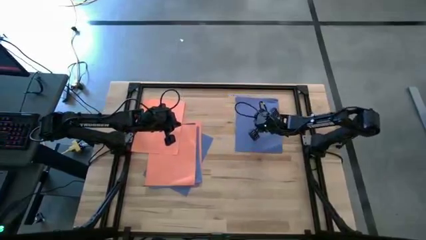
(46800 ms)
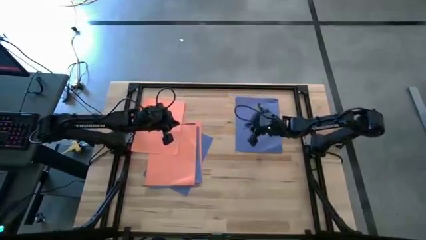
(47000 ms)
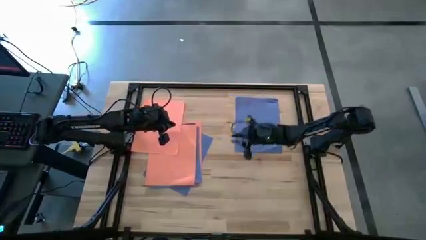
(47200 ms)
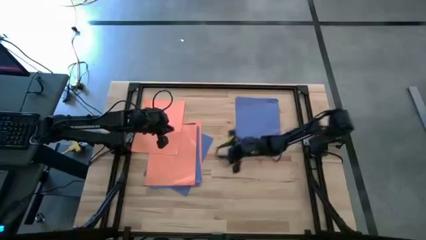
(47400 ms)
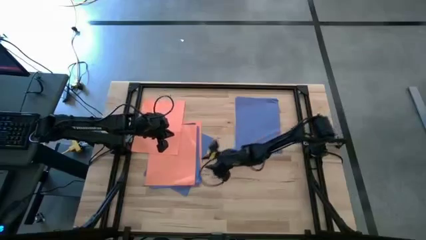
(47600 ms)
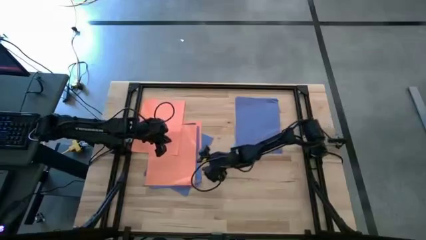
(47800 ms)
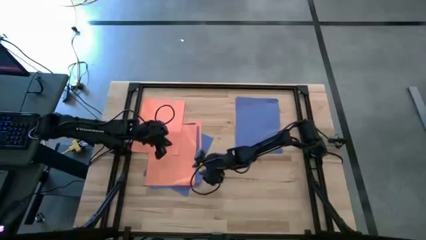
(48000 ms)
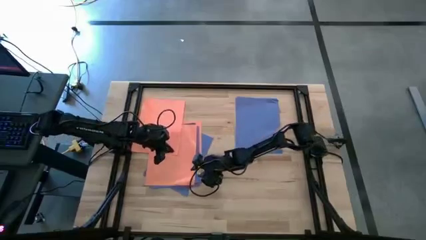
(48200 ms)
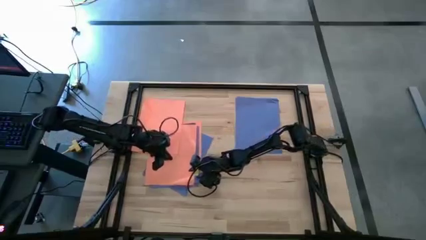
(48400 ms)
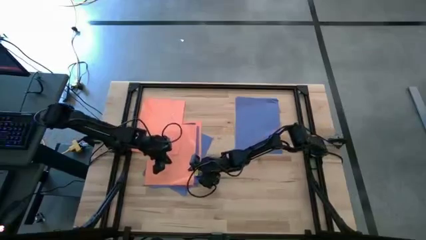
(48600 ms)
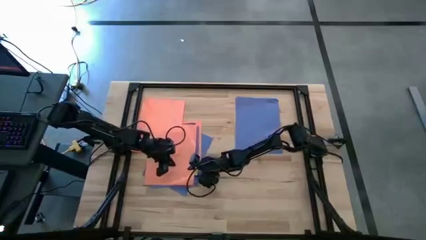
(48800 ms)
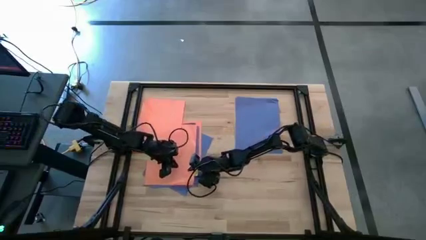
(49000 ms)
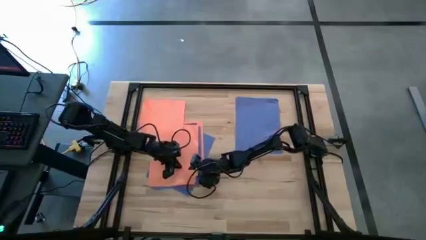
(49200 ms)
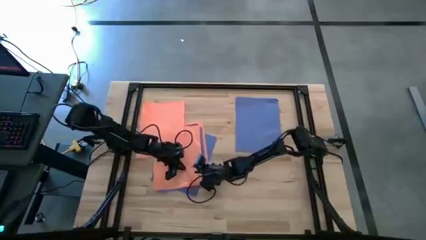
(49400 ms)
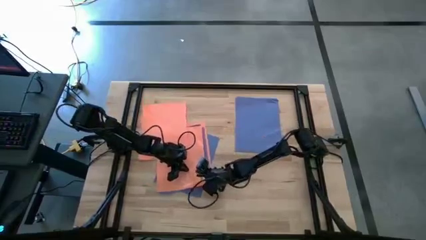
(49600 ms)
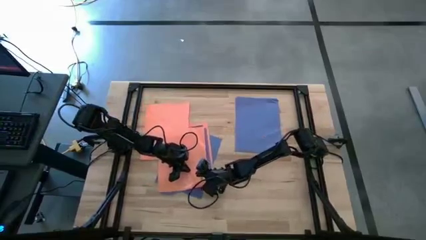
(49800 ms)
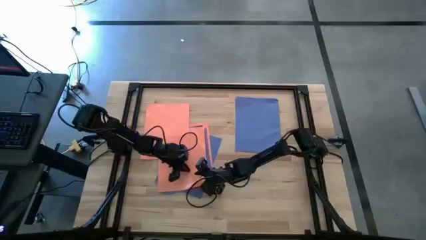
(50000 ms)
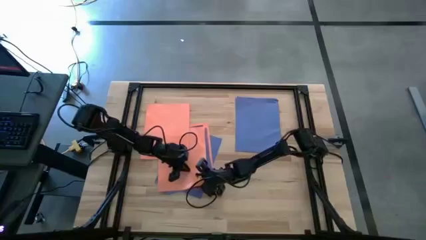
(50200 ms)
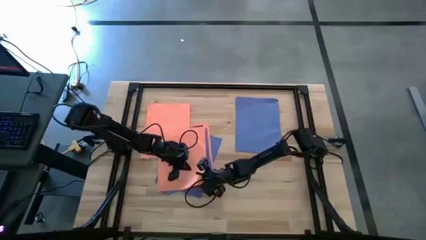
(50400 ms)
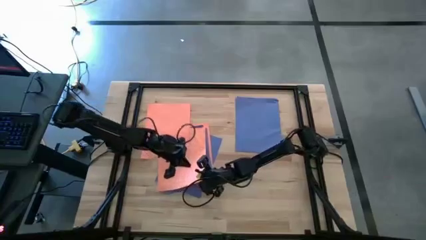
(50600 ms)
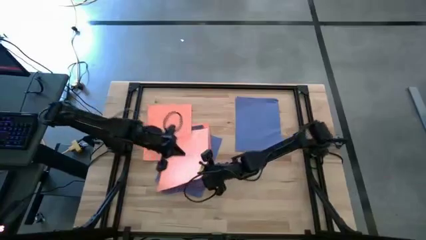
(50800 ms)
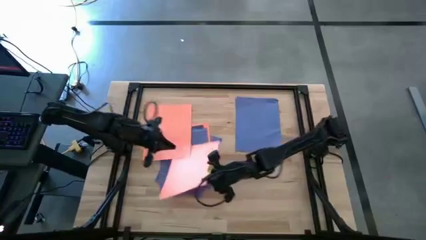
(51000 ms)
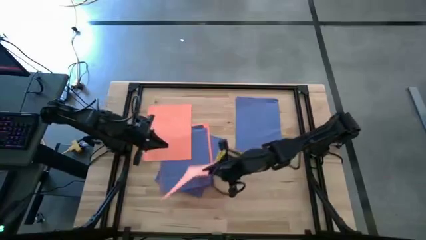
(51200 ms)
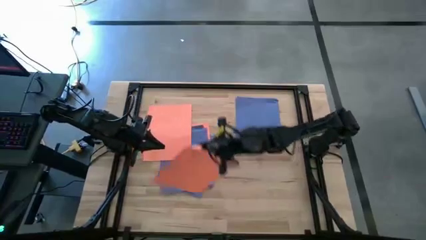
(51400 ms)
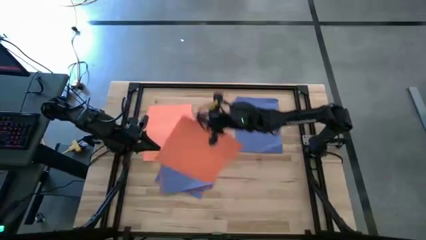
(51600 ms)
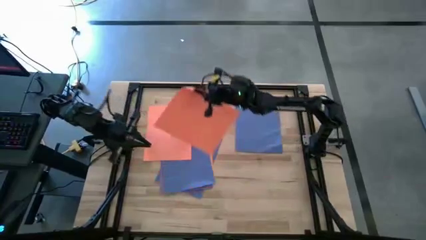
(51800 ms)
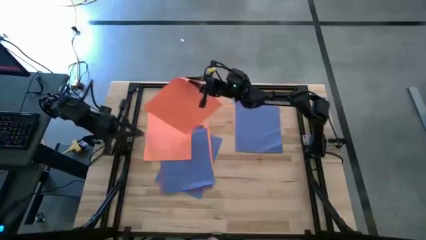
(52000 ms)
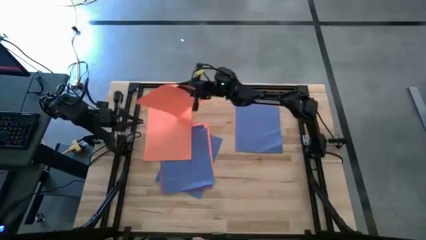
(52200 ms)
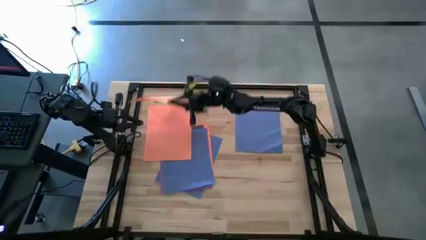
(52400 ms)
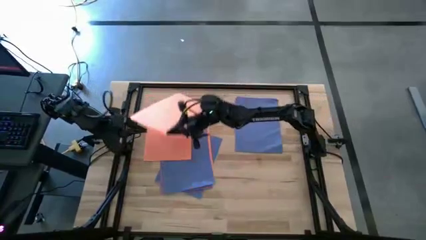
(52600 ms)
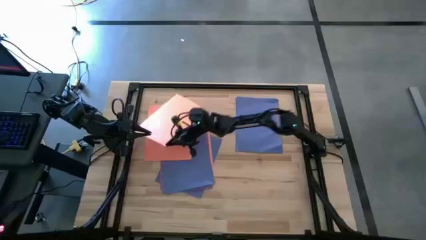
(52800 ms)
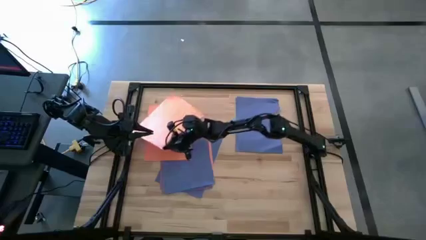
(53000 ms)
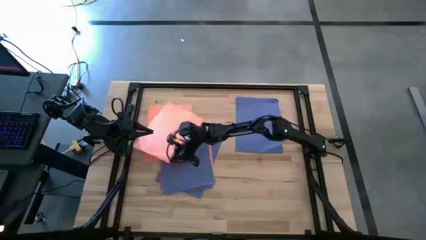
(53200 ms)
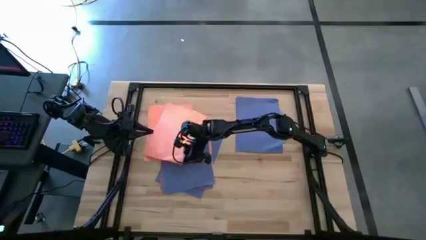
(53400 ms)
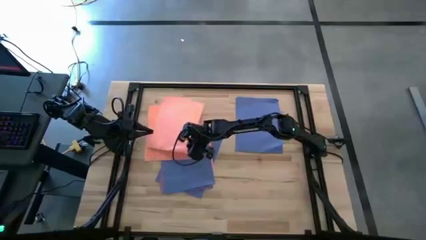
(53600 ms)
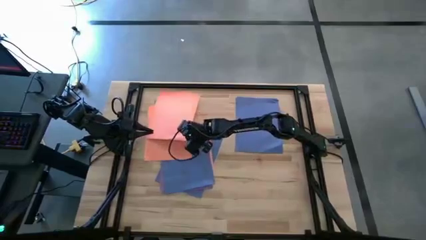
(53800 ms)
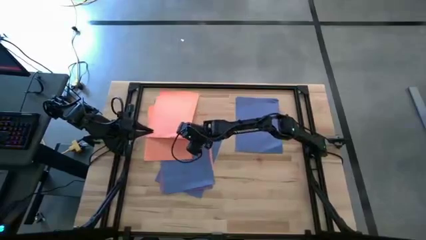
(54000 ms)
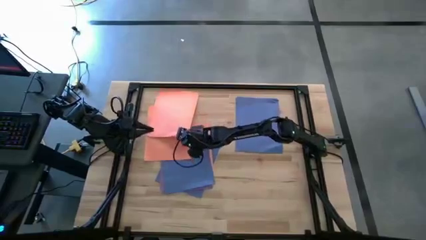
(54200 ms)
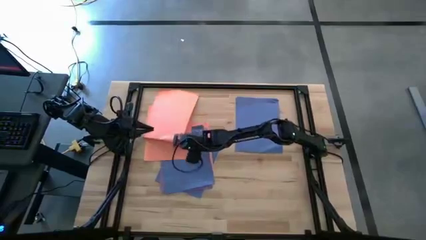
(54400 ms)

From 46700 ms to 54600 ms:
Task: Organize paper
Stack the orange paper on top of the orange paper

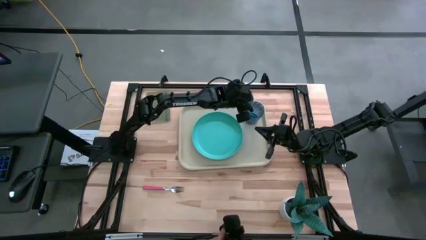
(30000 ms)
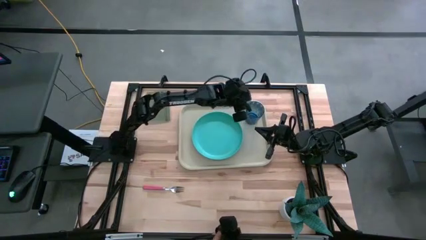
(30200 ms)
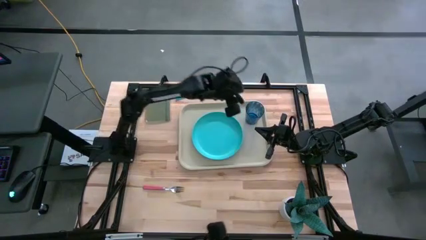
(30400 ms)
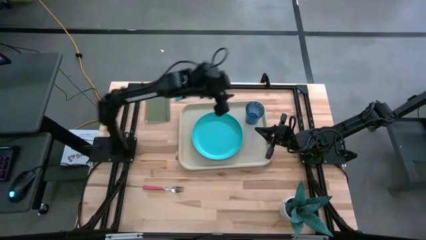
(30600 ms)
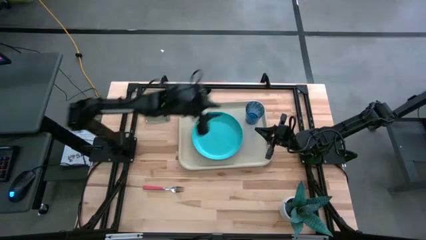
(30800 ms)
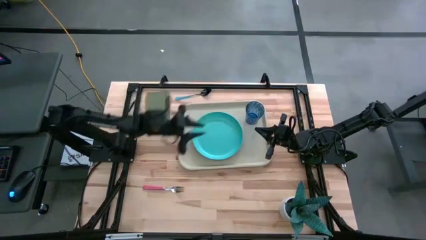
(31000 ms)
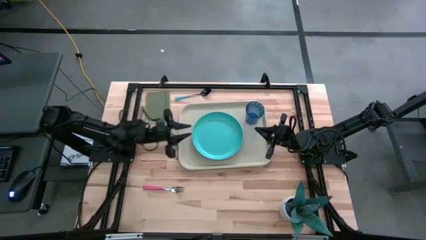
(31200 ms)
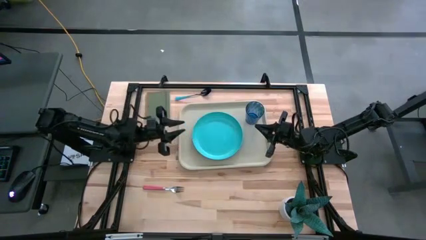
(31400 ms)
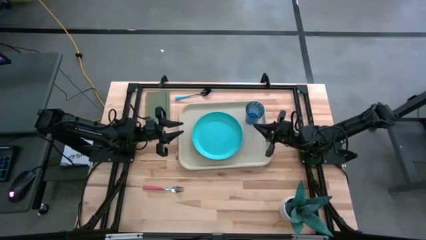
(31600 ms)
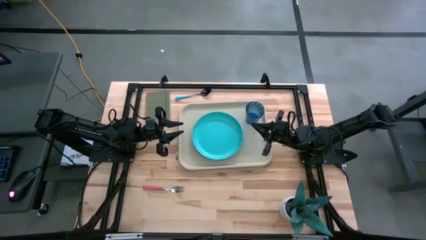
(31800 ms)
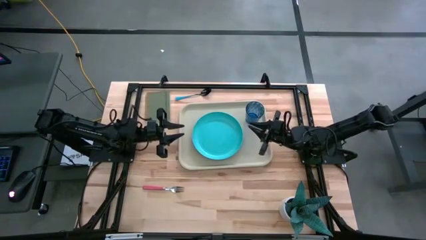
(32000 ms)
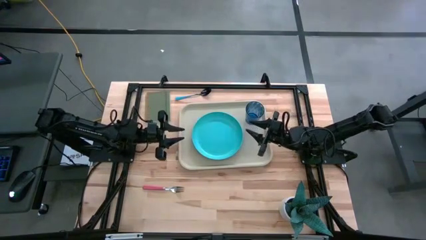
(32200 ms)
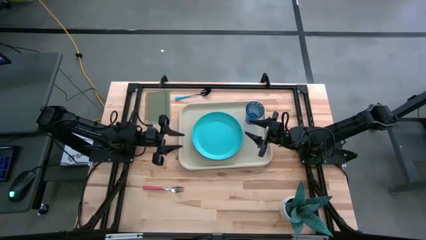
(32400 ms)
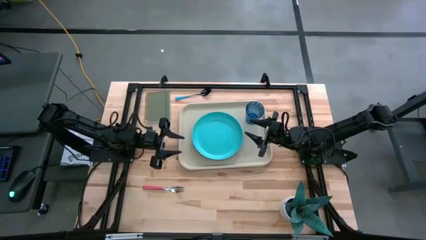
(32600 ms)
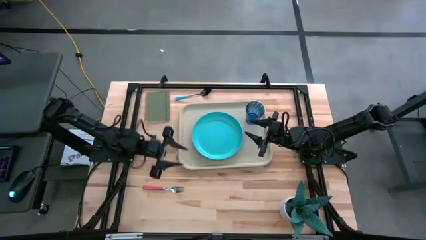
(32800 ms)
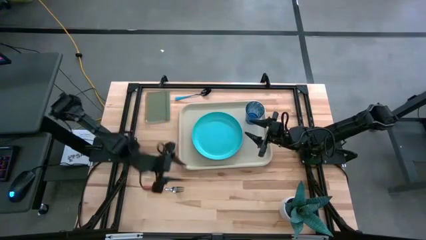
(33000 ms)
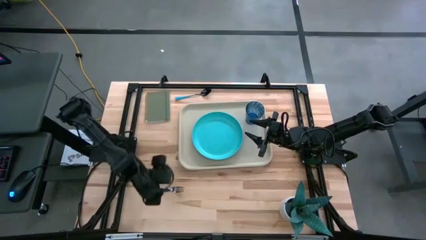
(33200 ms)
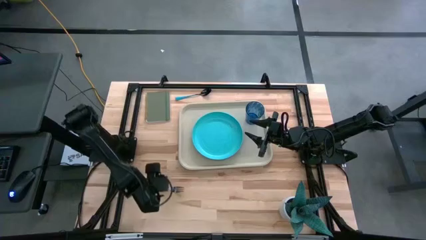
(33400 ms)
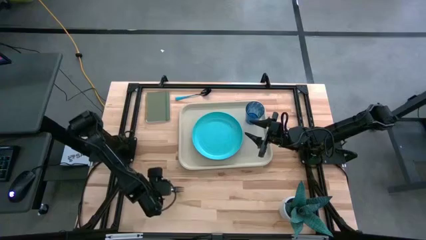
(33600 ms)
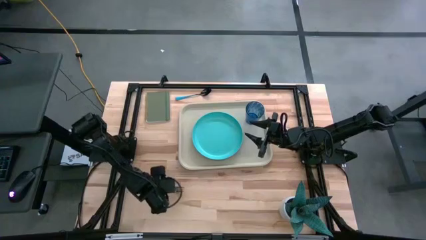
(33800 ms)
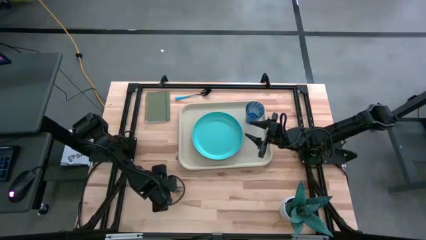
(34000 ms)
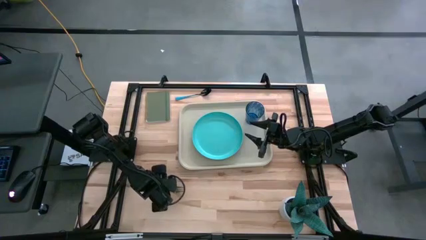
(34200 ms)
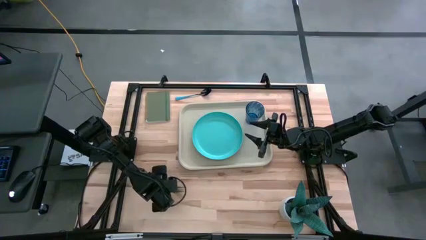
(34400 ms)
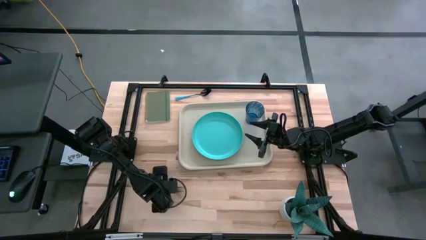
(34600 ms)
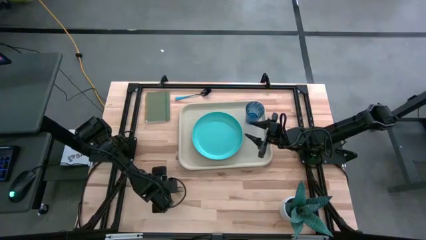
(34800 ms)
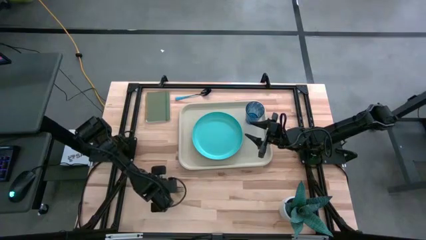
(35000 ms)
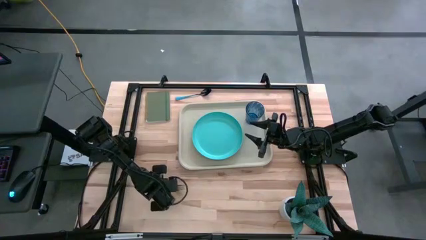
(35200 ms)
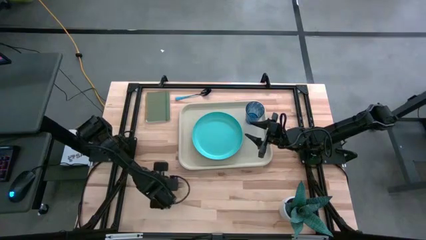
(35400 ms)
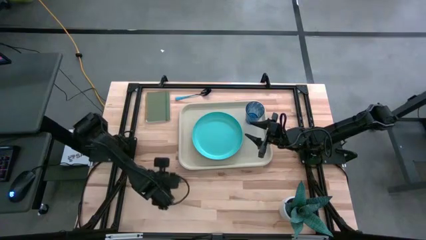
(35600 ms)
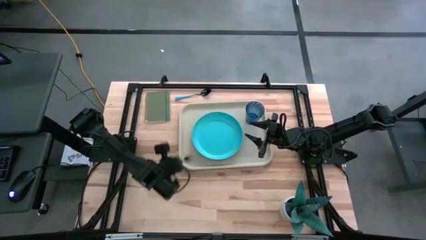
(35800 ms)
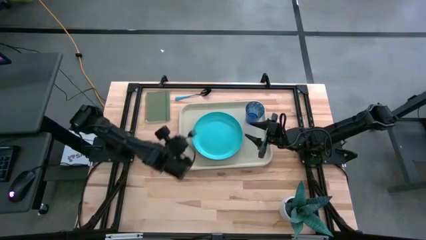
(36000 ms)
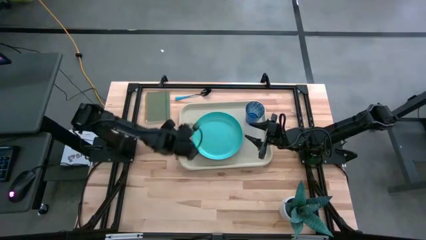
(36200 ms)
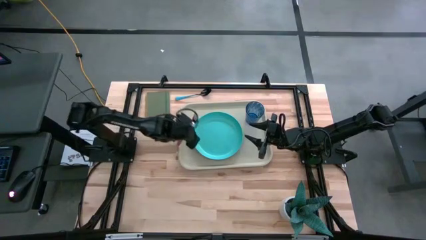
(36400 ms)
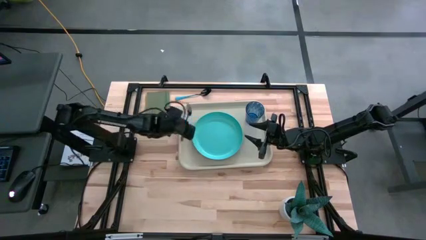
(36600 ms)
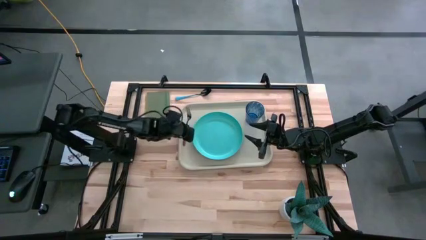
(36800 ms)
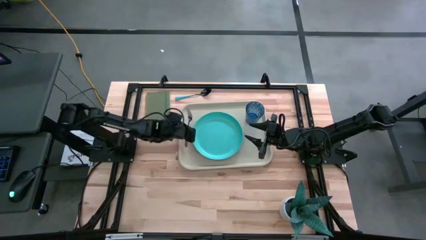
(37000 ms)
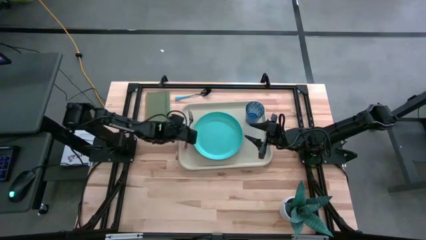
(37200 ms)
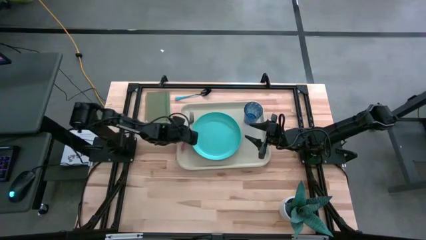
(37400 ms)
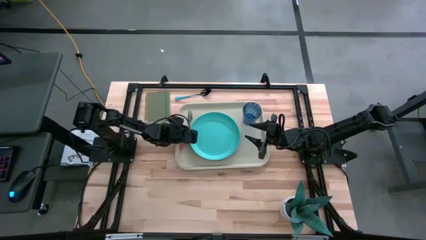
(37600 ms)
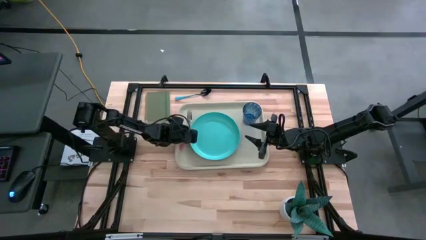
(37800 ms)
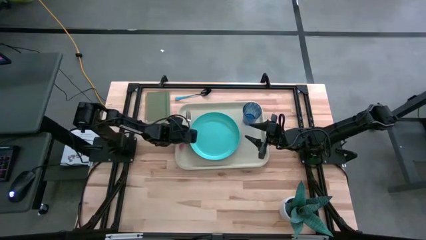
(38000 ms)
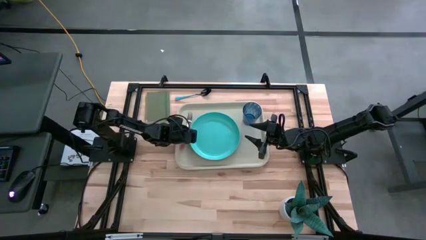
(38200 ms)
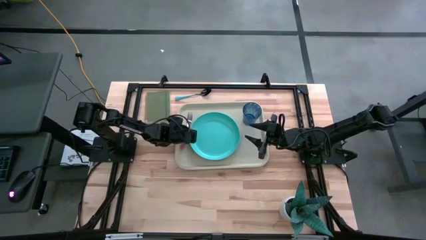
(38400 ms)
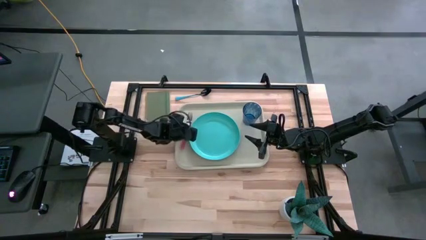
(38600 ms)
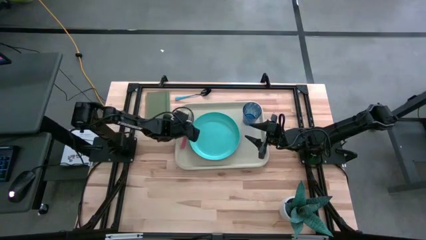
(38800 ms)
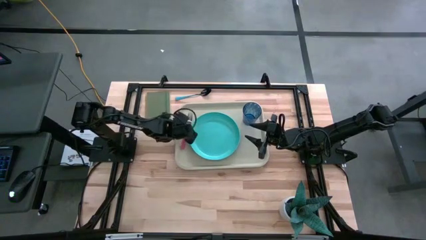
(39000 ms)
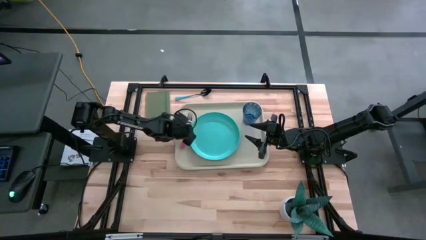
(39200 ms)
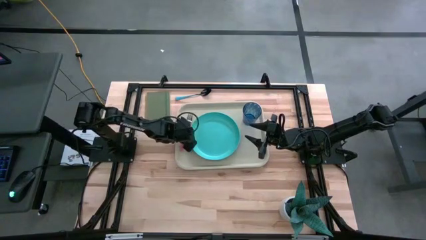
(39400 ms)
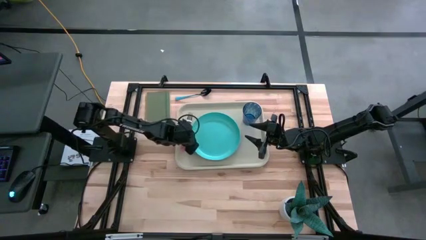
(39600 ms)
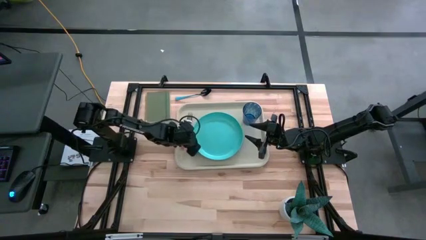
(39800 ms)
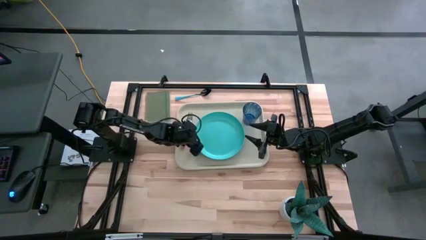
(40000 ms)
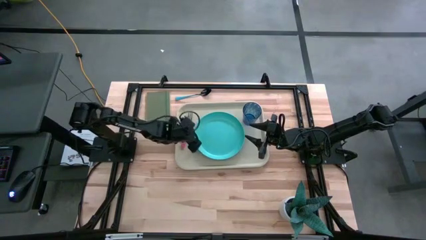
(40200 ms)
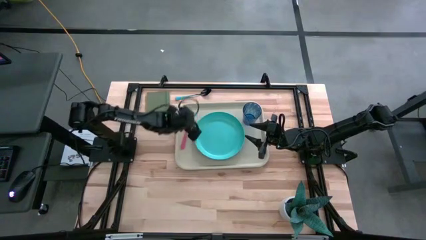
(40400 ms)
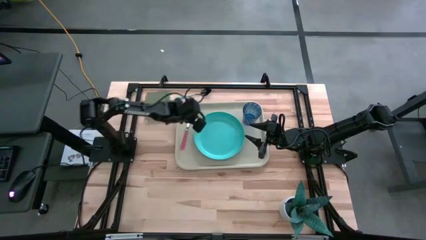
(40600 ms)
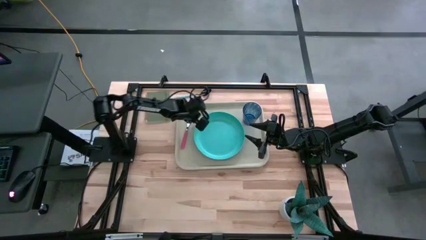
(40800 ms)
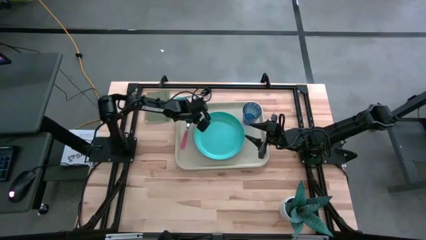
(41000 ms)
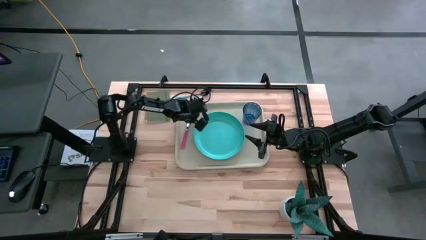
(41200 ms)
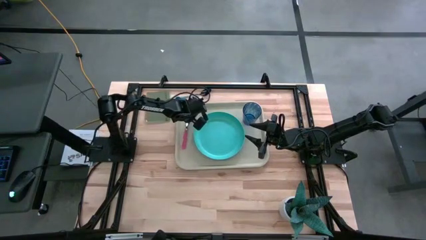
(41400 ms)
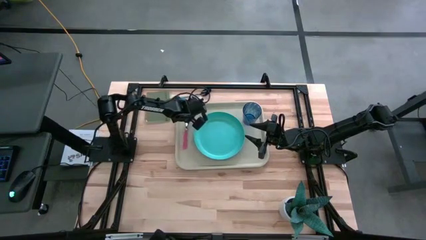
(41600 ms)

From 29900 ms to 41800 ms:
Task: Pick and place plate/cup/fork/spoon on tray
Put the pink fork to the left side of the green plate on the gray serving tray
